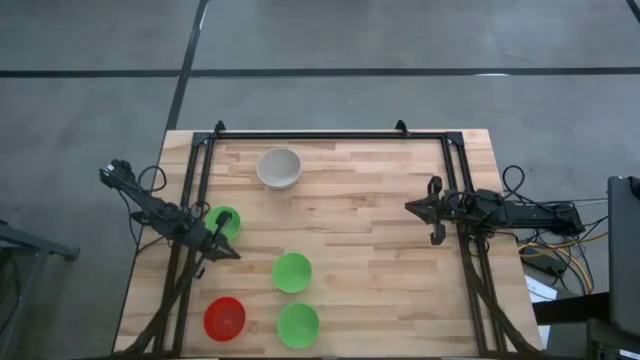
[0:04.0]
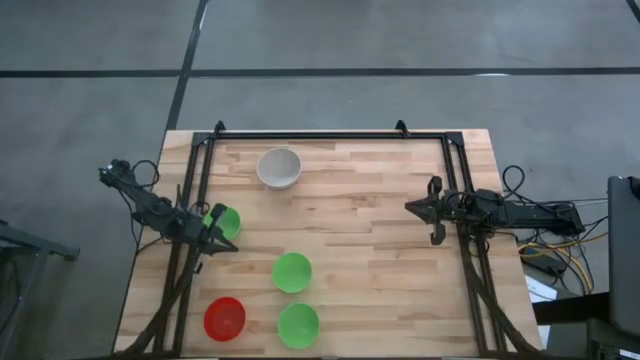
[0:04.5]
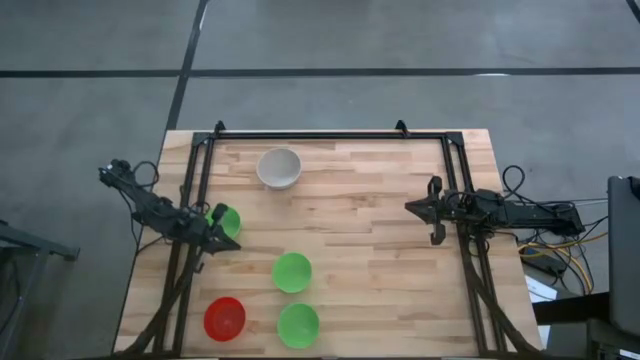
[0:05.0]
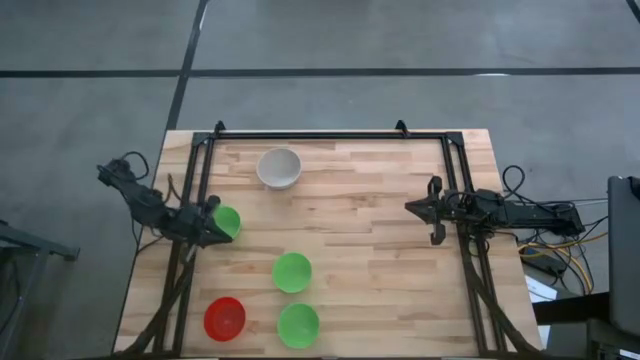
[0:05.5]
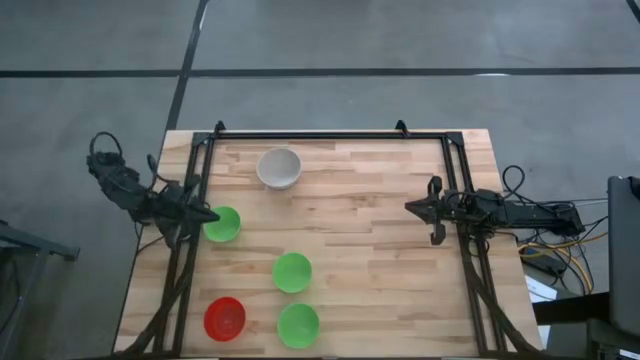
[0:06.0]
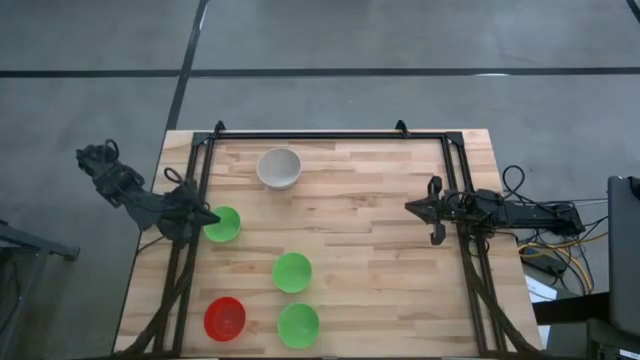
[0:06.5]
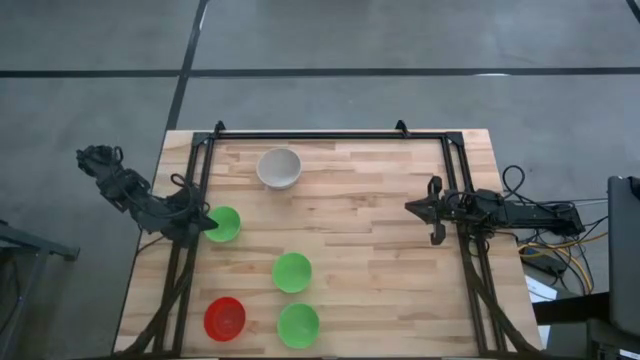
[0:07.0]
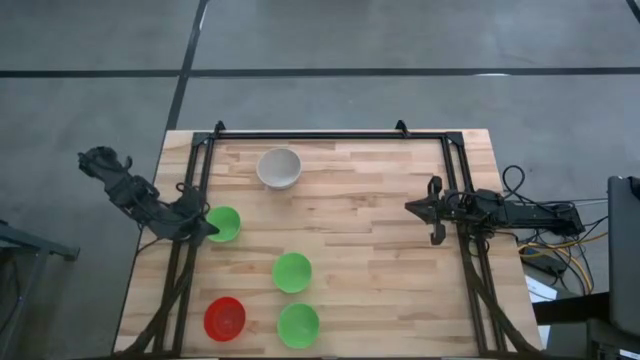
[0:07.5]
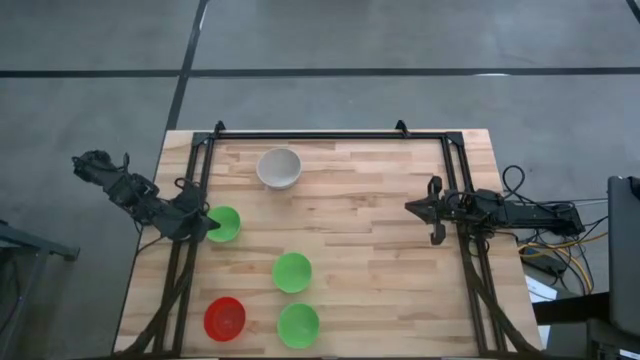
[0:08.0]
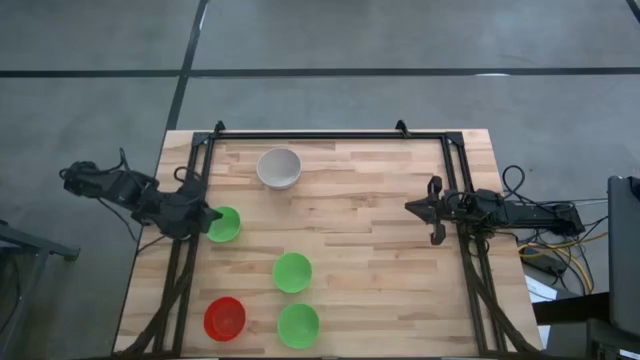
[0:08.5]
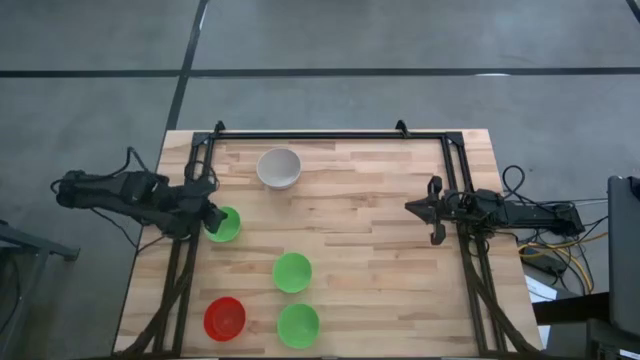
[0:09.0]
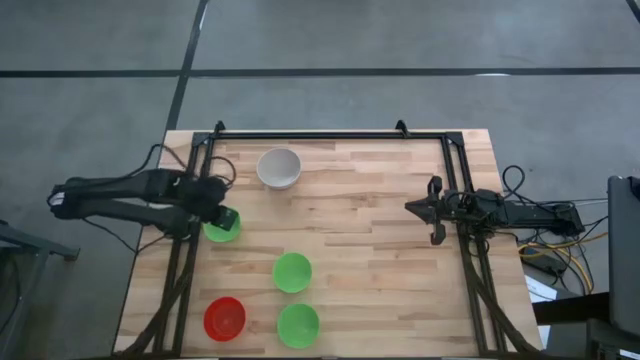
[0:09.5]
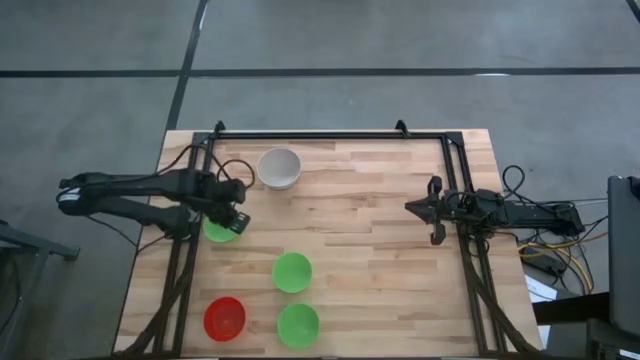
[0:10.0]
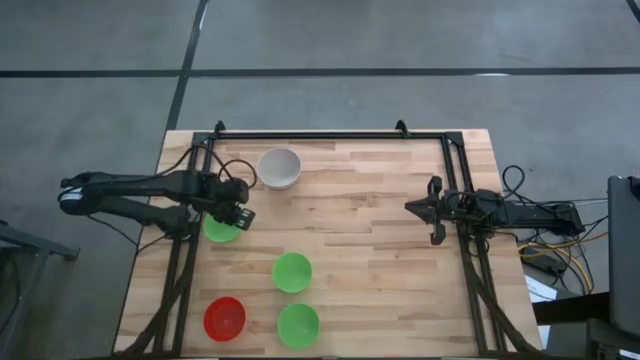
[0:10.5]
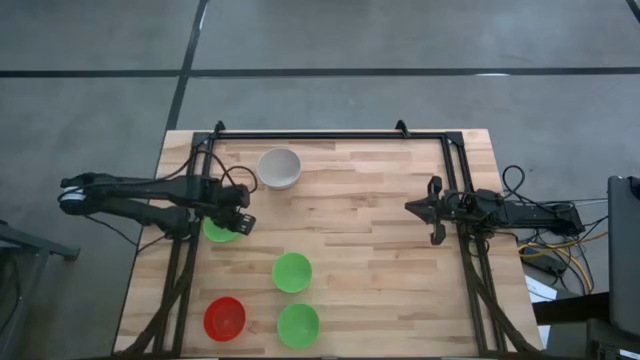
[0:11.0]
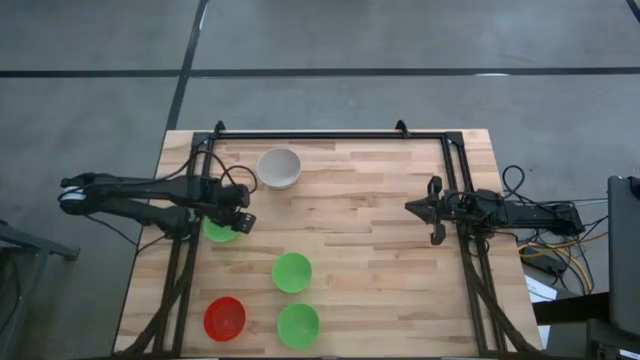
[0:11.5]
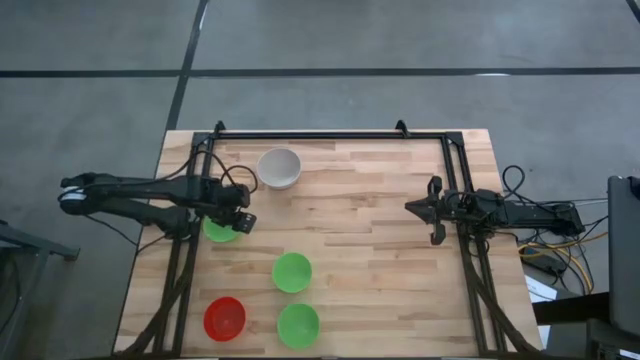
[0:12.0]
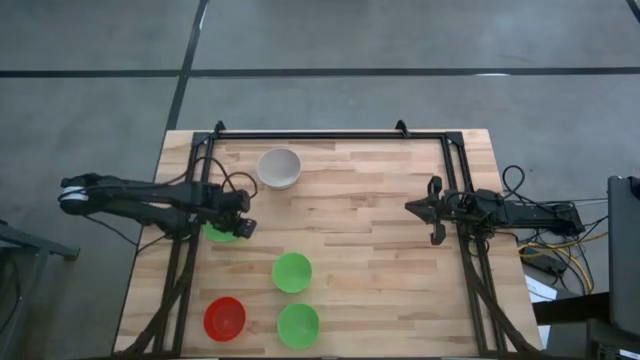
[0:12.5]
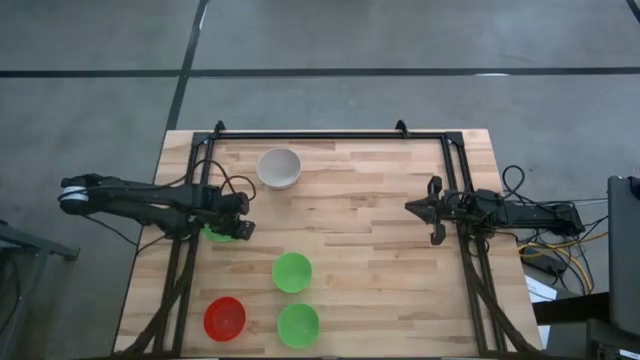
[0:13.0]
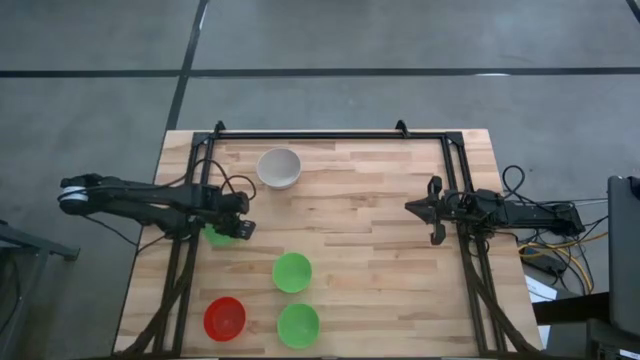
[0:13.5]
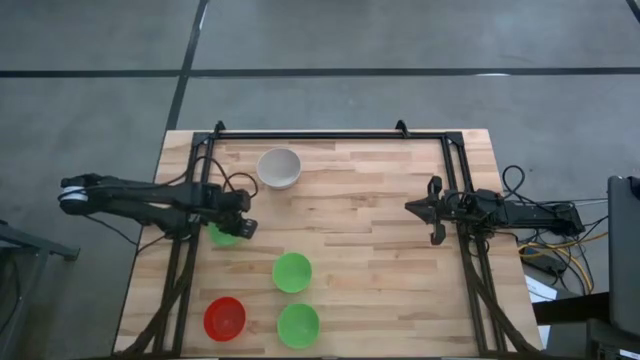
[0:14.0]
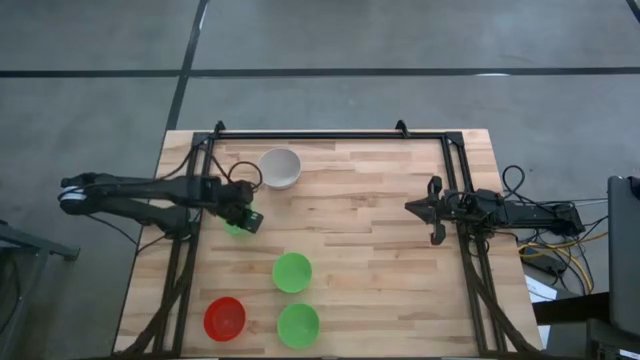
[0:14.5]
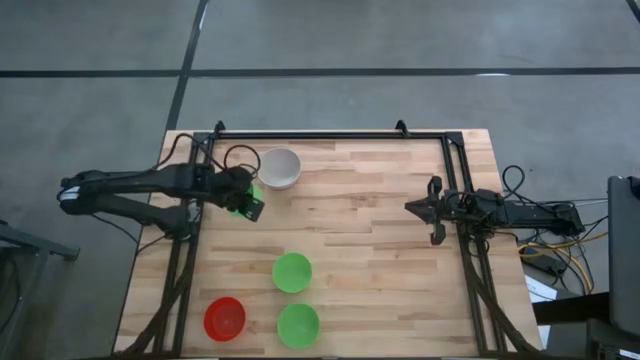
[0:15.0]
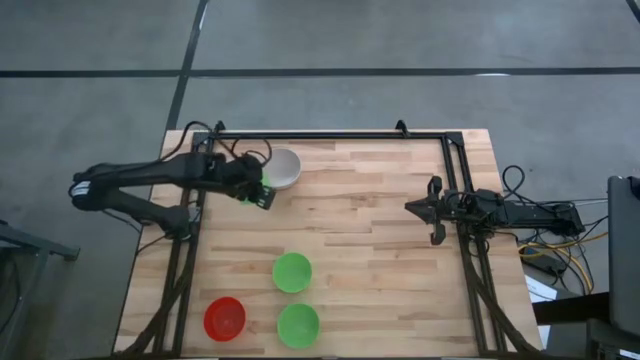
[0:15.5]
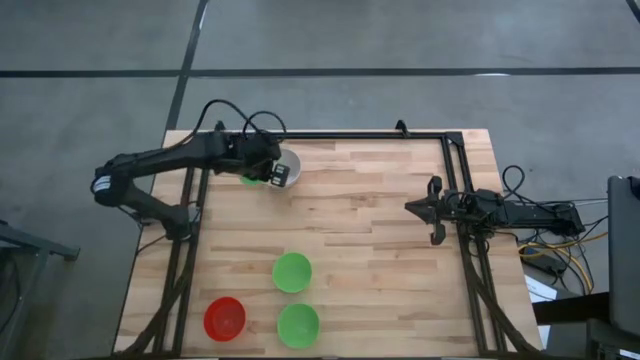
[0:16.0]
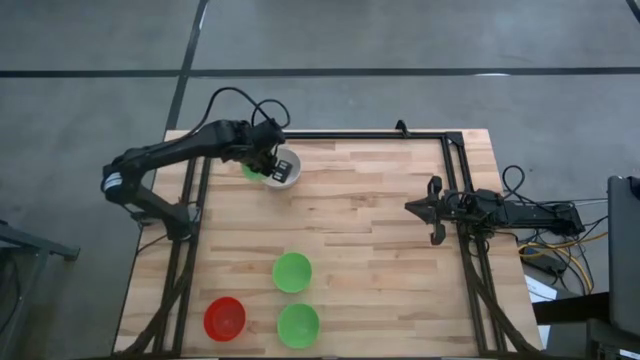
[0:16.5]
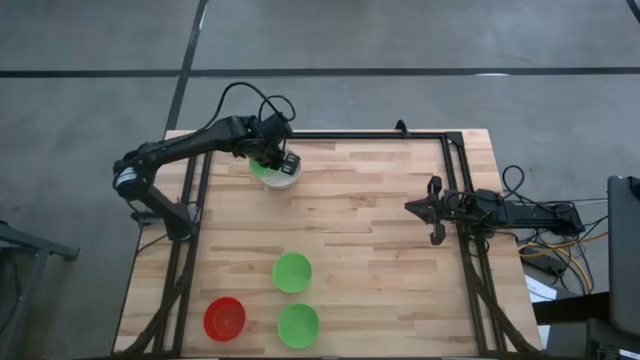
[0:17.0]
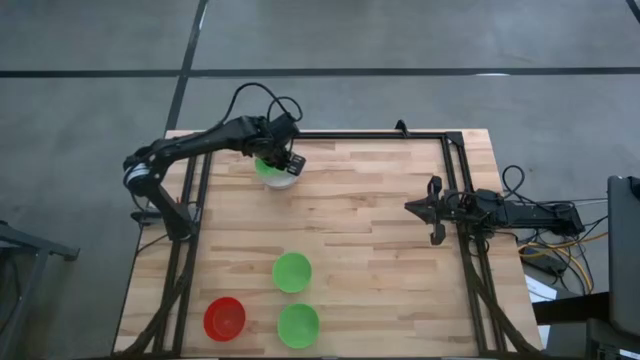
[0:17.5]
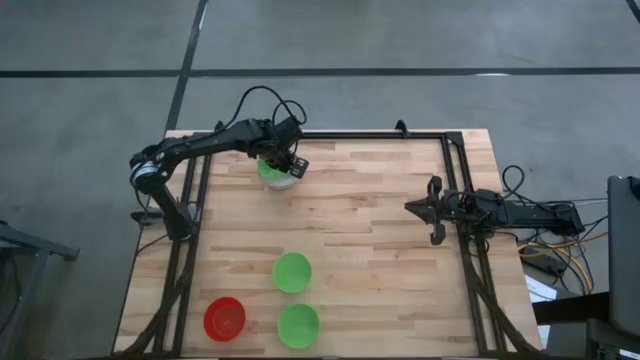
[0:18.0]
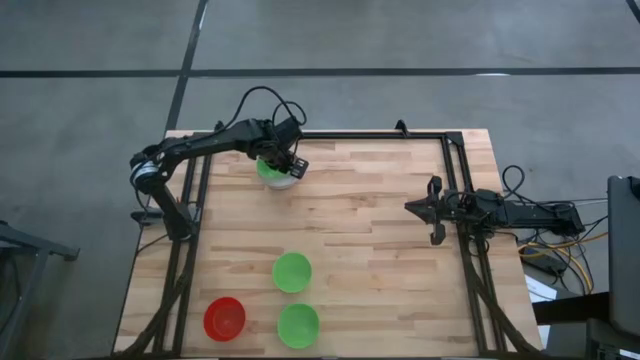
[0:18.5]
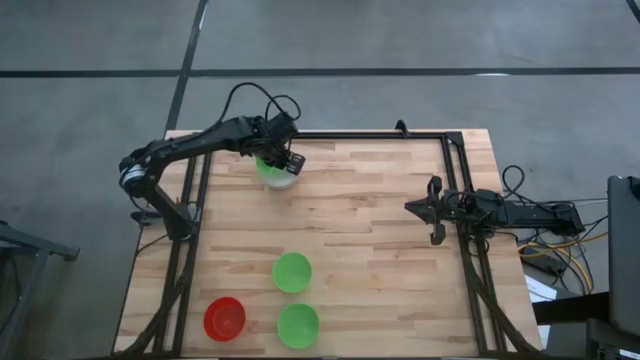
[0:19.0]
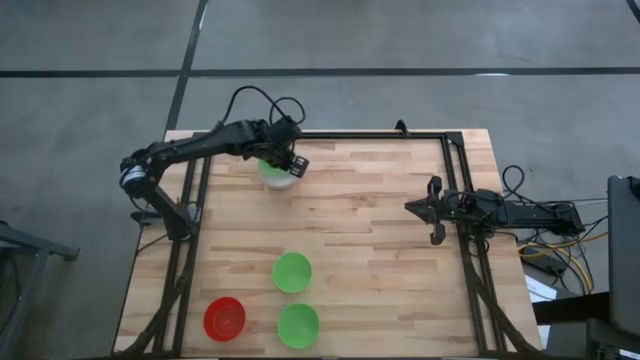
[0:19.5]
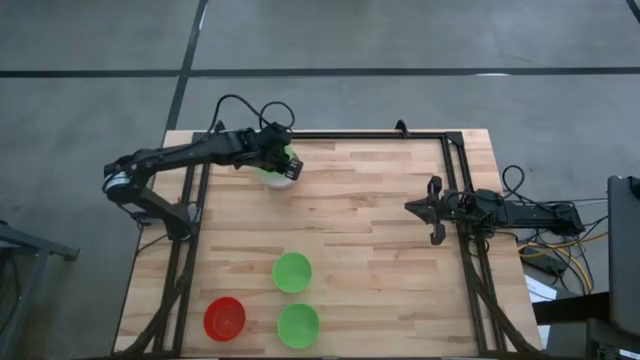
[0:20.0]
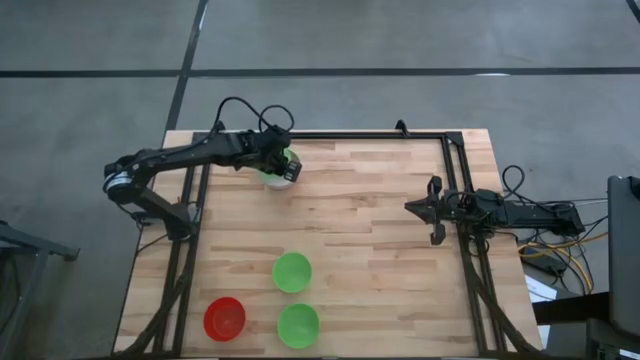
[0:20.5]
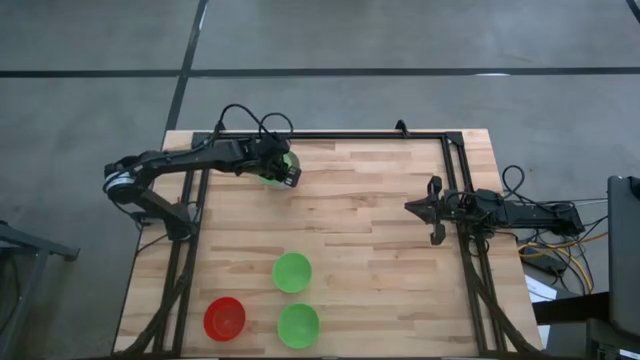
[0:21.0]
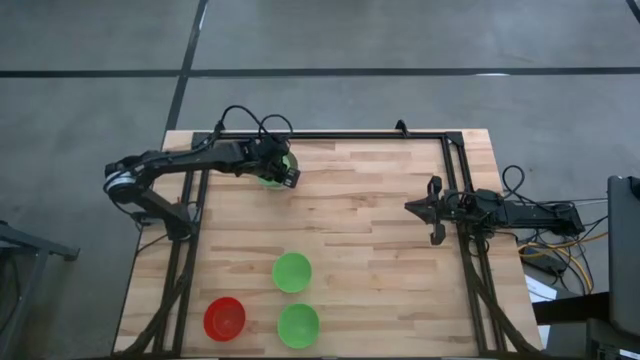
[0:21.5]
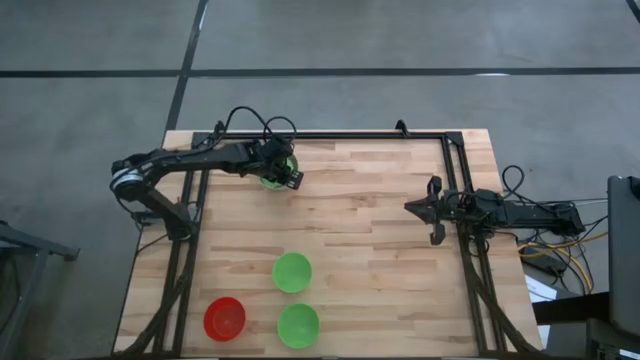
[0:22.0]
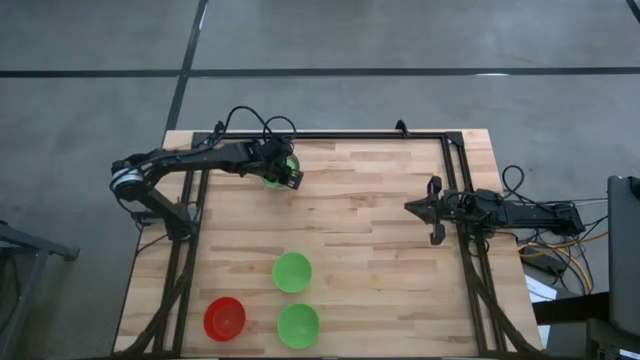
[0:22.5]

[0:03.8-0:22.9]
Stack the top green bowl on the white bowl
